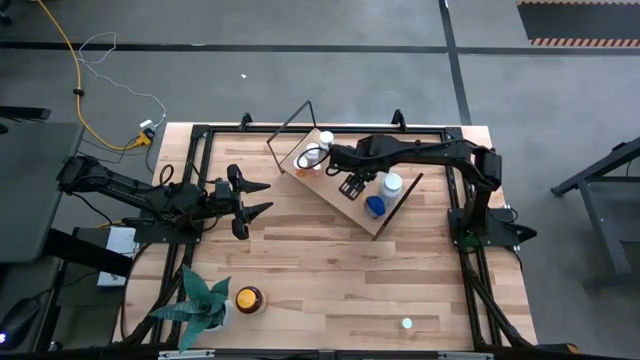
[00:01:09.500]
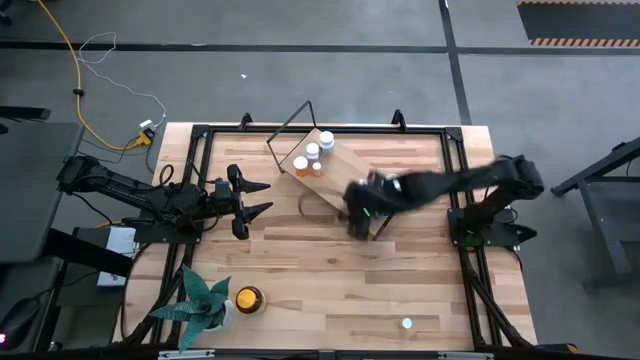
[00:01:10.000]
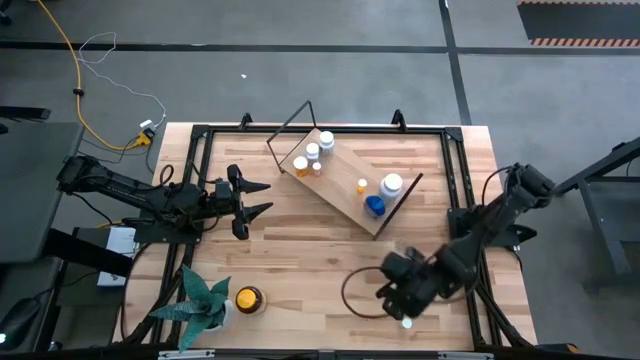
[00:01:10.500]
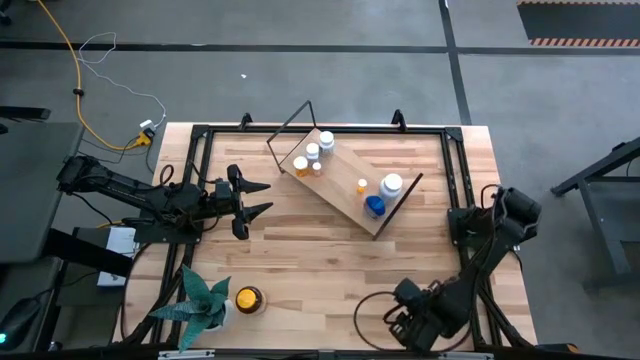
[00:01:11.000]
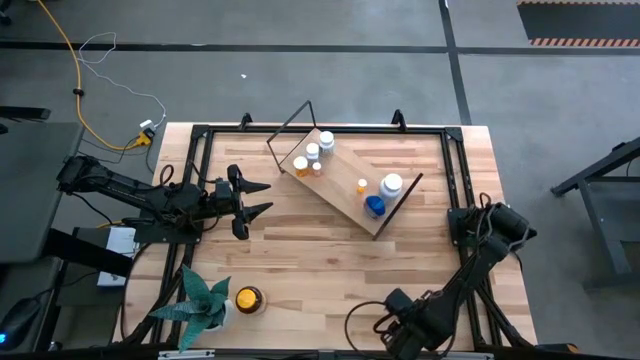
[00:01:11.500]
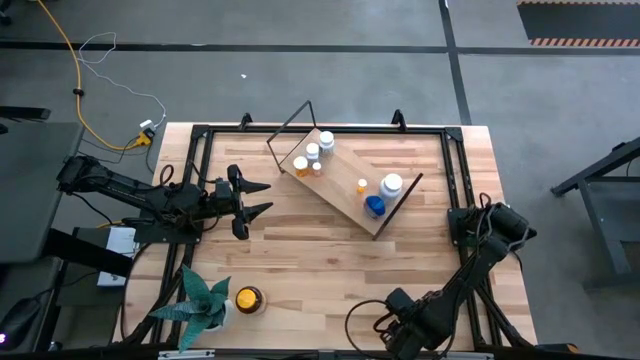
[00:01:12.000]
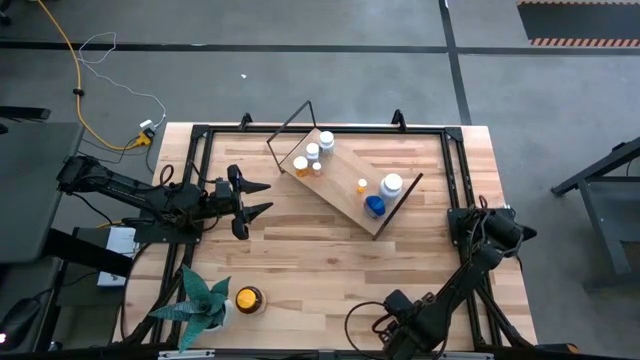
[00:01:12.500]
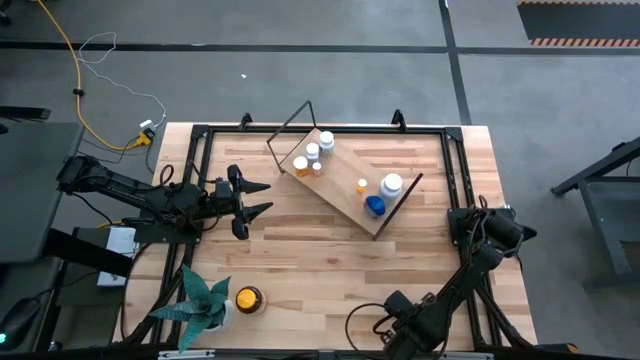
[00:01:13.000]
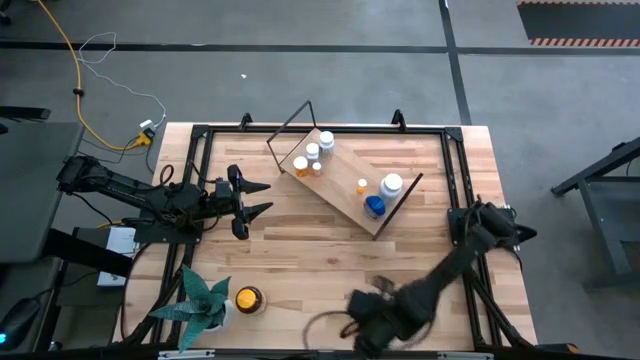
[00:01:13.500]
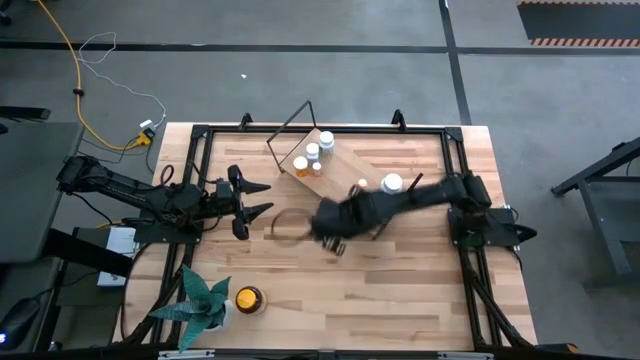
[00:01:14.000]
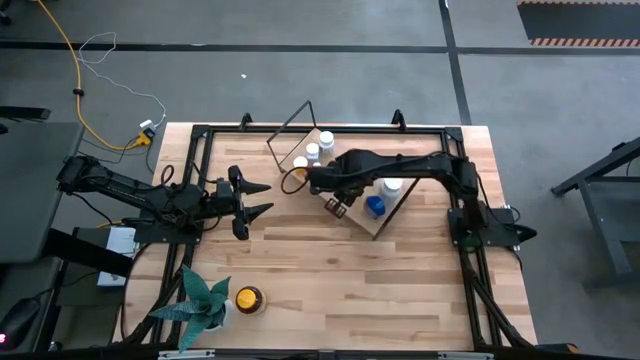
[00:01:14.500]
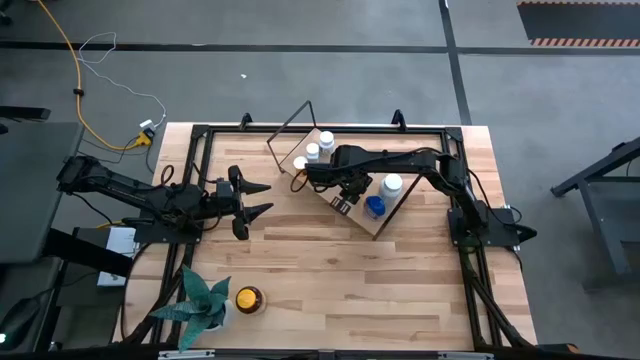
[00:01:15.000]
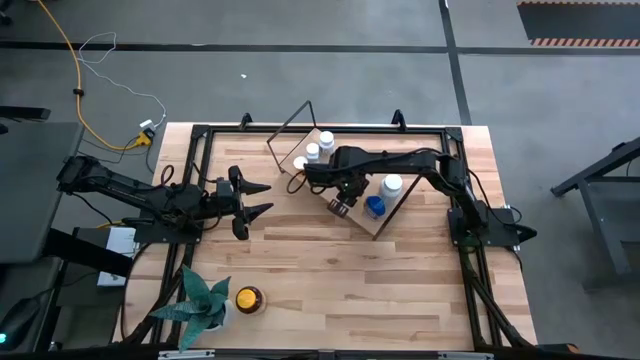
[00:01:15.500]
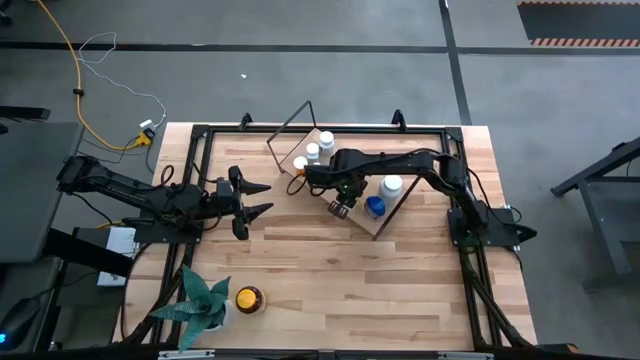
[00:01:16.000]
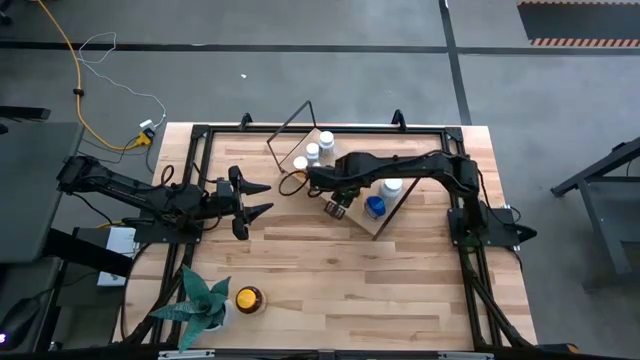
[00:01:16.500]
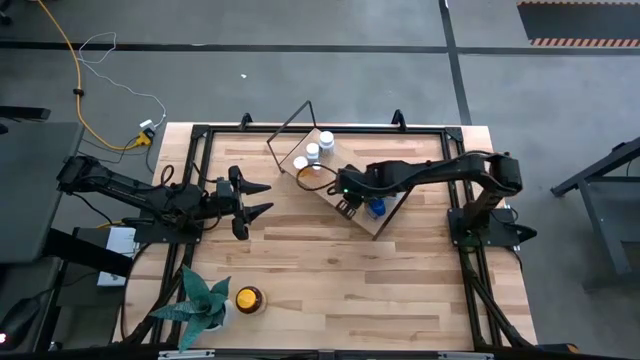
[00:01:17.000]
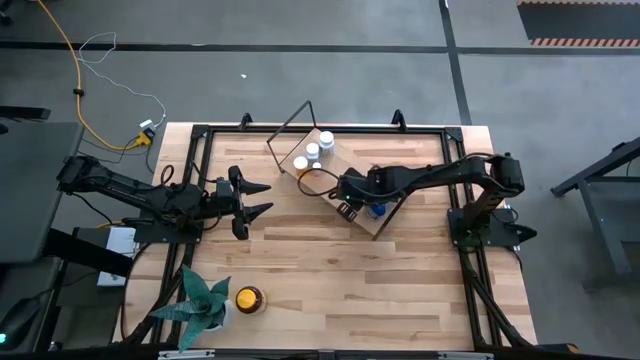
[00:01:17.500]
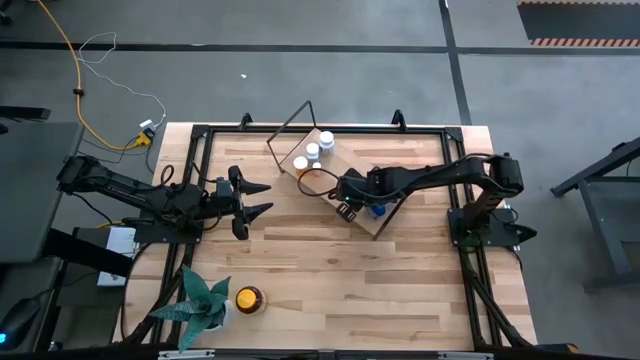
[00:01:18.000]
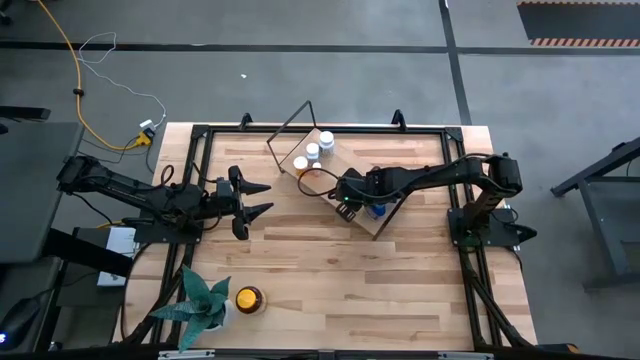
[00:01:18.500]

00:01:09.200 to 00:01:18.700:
Task: Pick and place medicine bottles onto shelf by color
Put the light yellow pill bottle on the shelf

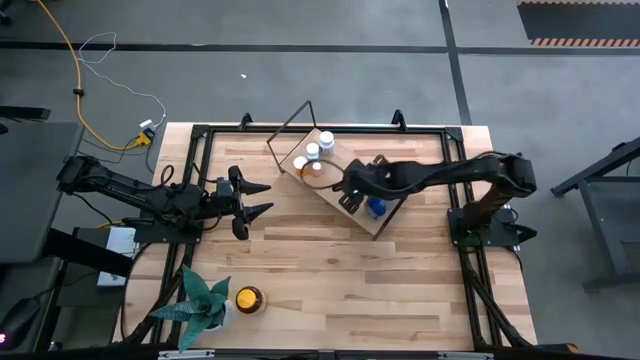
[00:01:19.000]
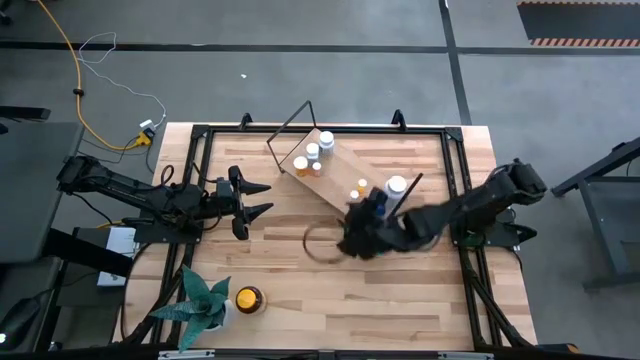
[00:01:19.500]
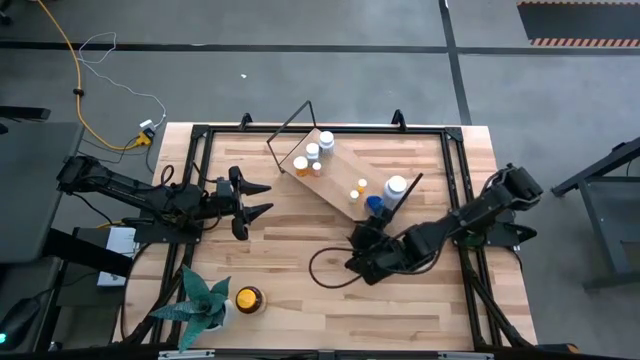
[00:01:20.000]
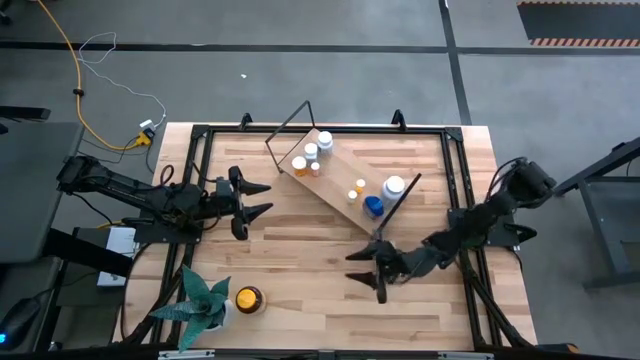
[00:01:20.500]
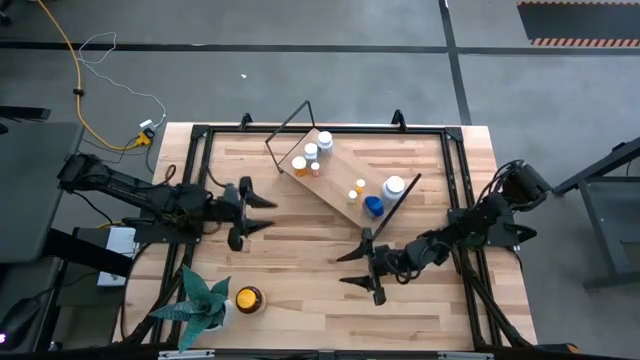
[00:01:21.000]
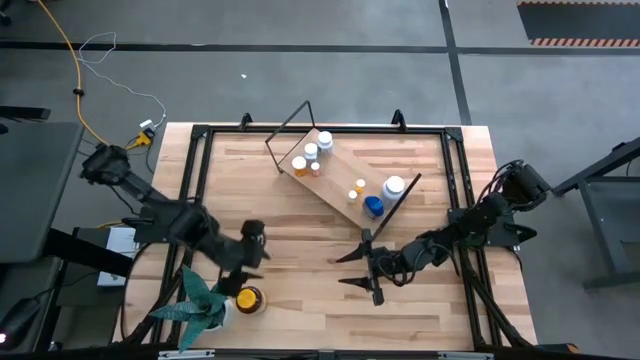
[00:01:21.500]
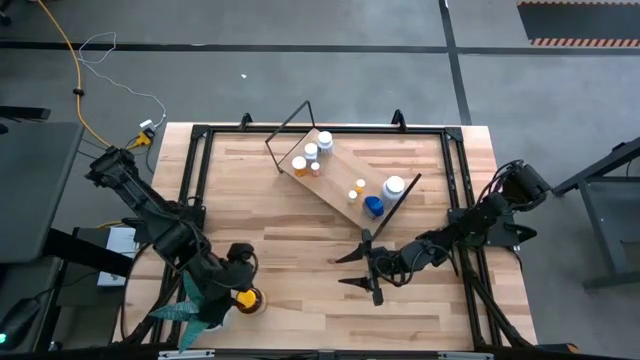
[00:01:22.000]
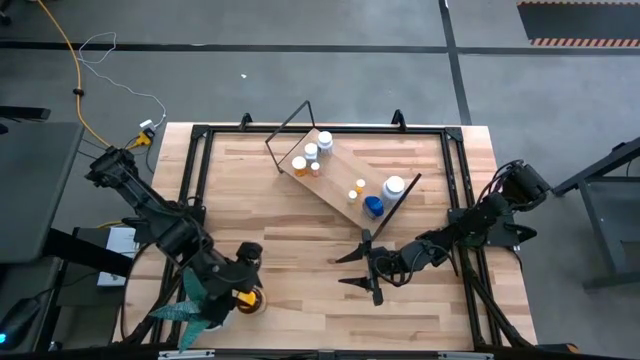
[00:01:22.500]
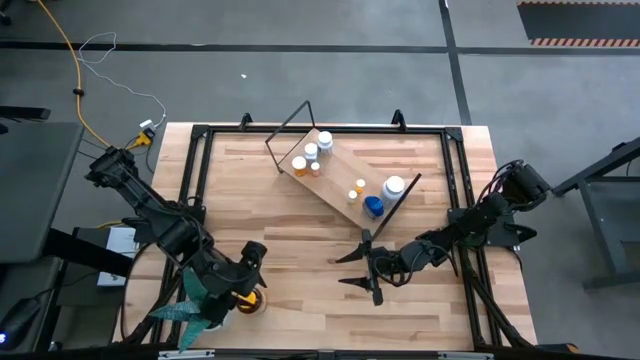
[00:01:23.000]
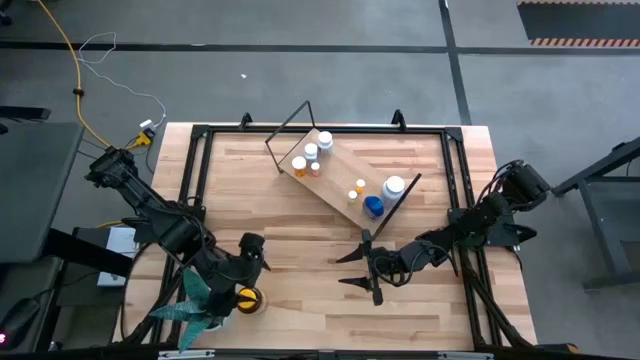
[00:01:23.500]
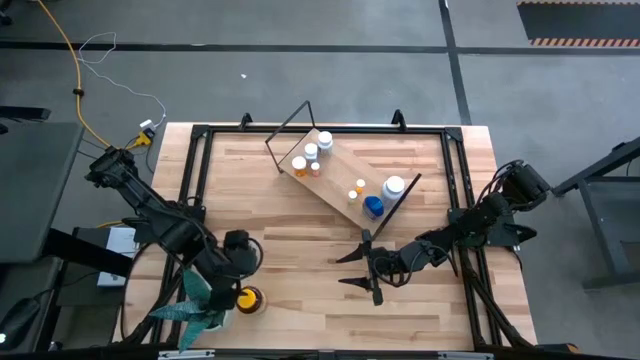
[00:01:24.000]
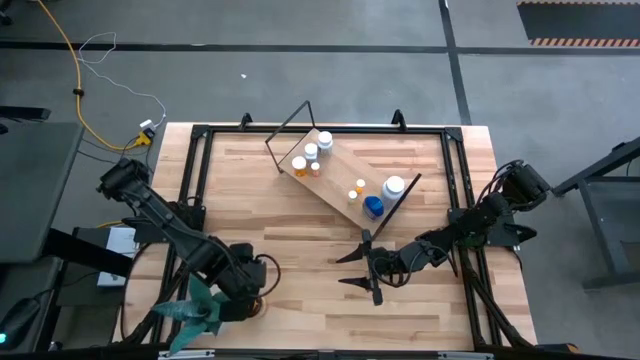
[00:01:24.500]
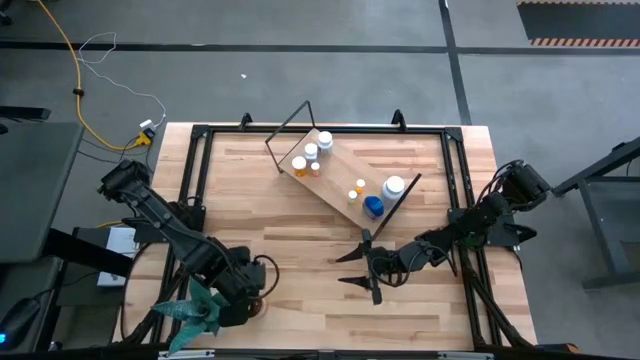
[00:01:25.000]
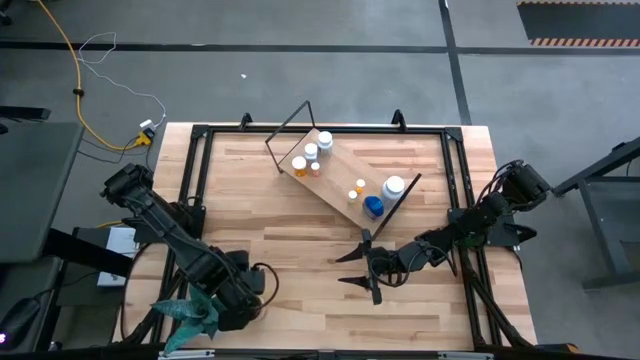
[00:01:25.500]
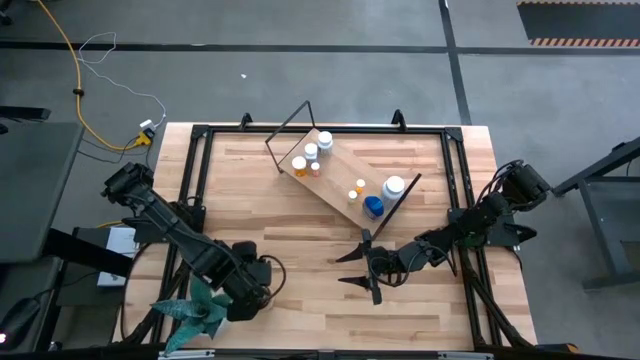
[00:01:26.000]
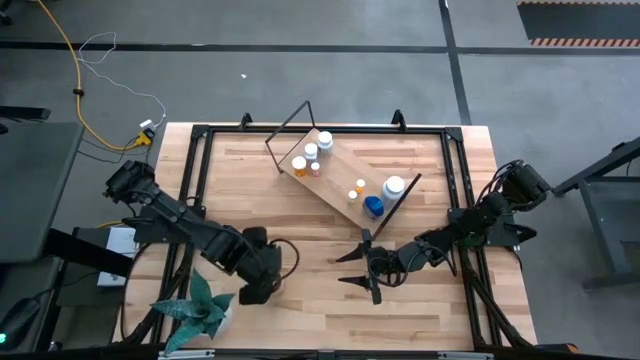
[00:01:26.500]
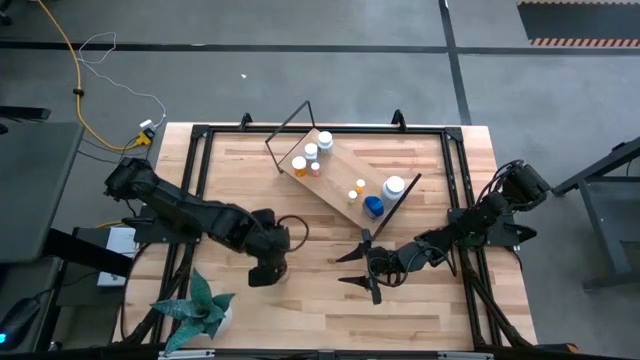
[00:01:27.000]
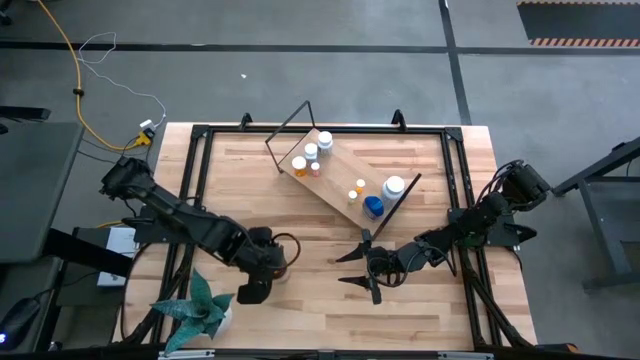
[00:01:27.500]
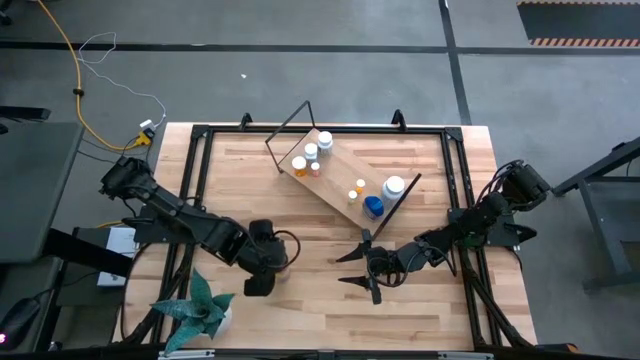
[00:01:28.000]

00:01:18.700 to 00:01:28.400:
Put the yellow pill bottle on the shelf

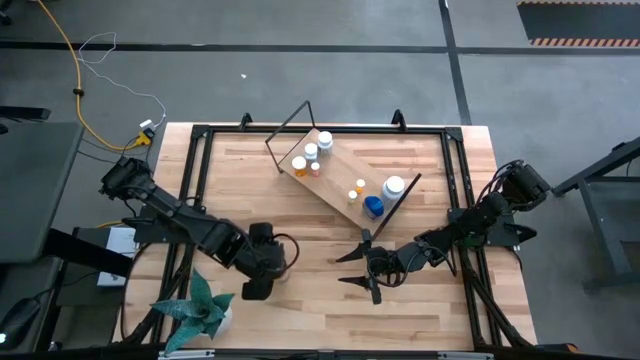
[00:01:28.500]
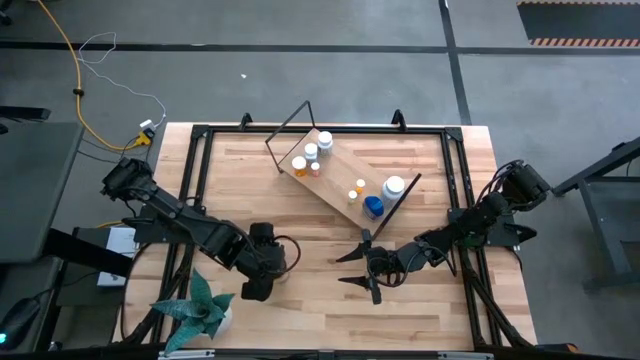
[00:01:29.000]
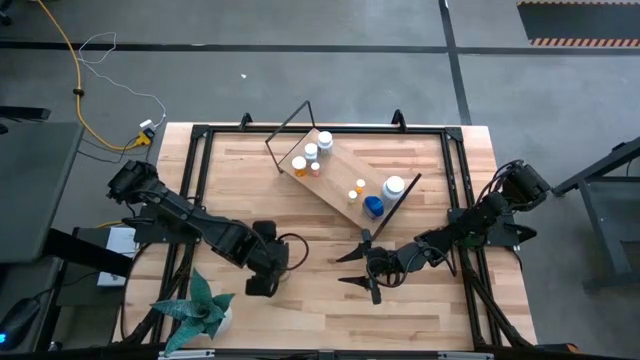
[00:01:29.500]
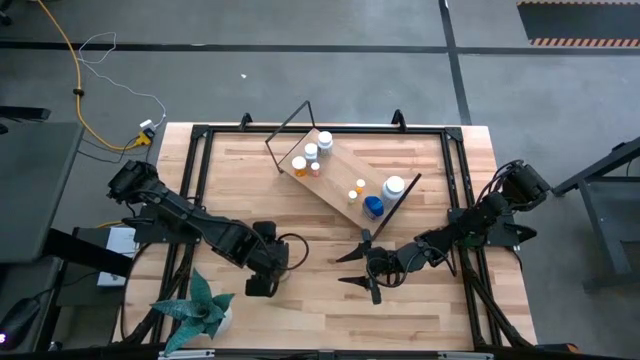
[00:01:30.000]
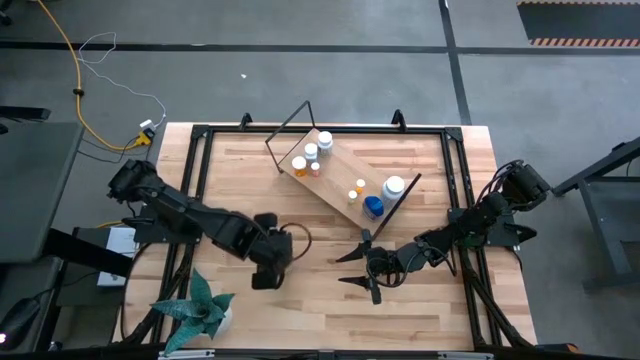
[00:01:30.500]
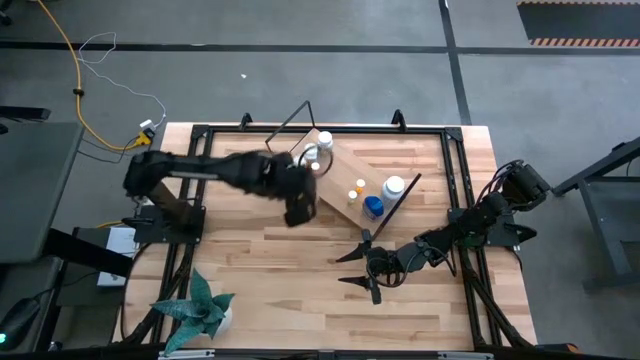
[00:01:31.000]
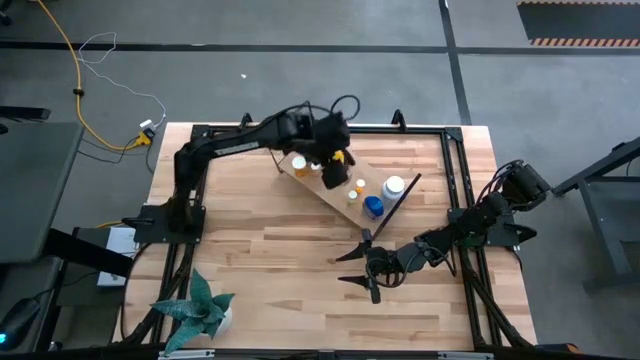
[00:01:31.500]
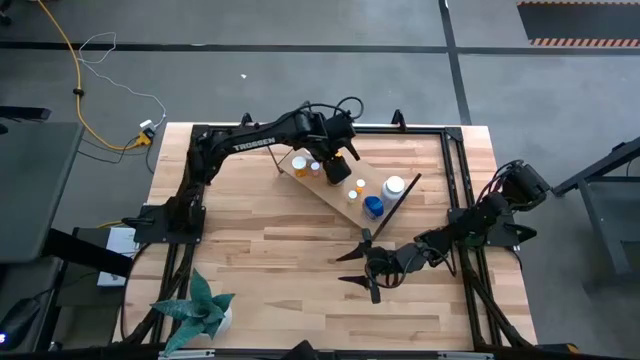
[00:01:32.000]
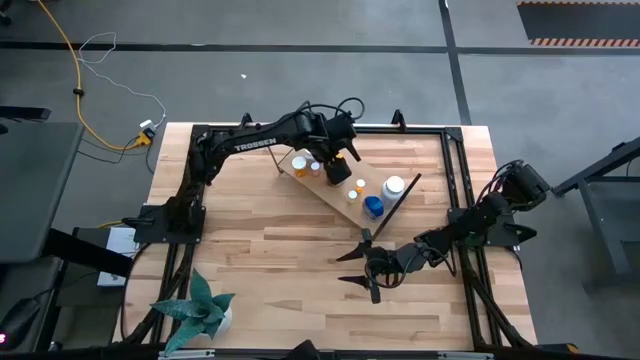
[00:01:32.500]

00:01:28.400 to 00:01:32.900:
Put the yellow pill bottle on the shelf
